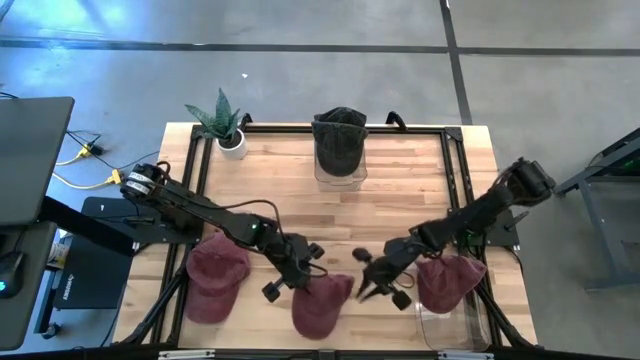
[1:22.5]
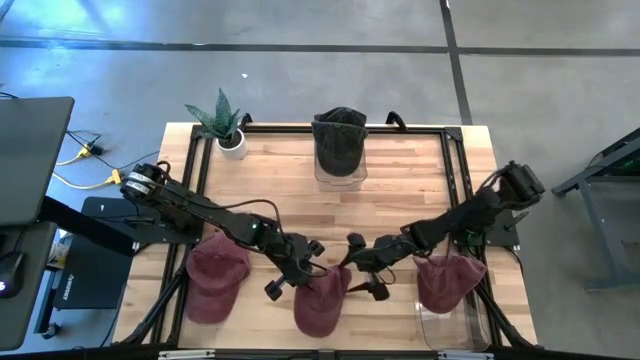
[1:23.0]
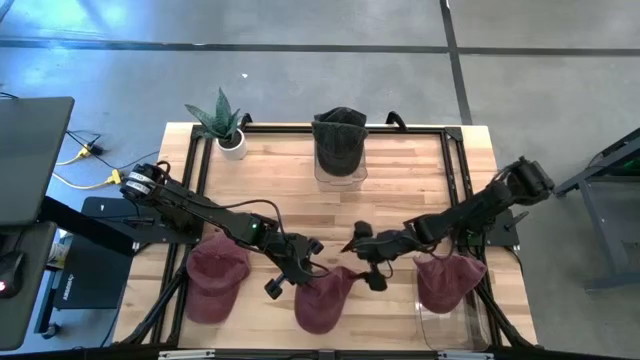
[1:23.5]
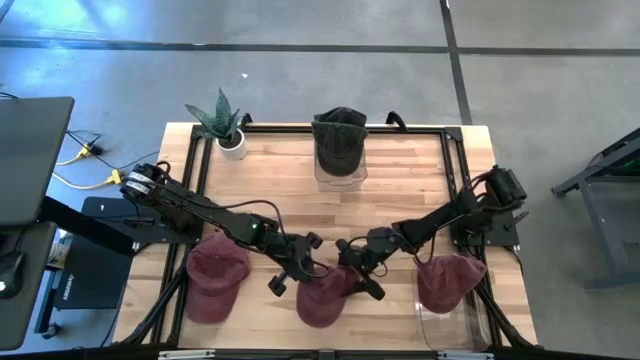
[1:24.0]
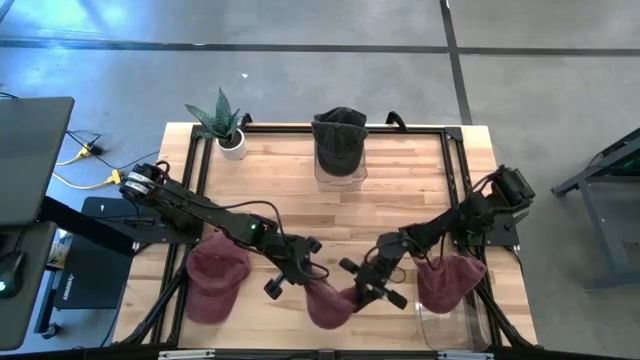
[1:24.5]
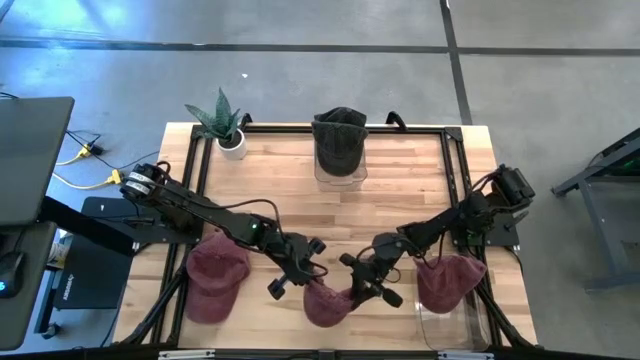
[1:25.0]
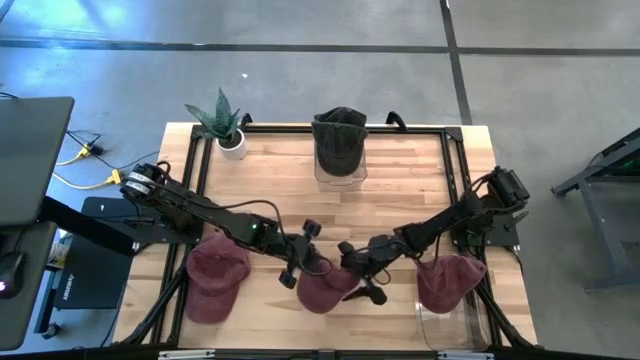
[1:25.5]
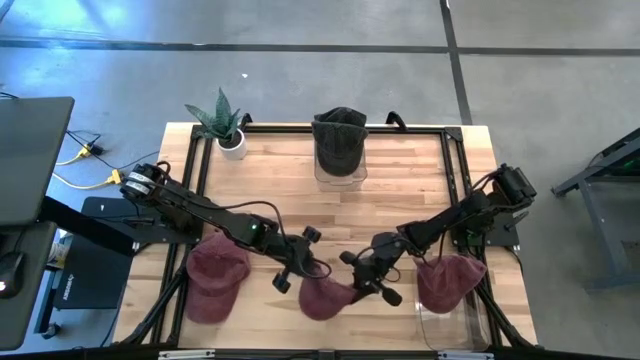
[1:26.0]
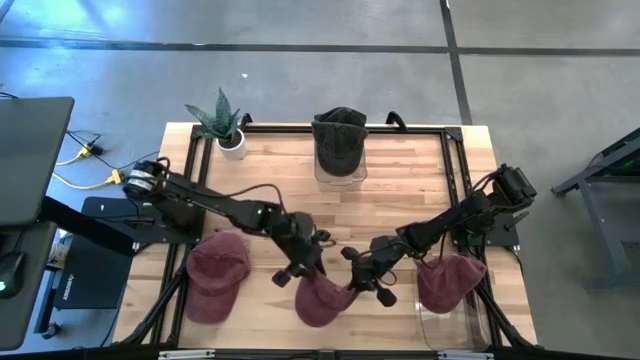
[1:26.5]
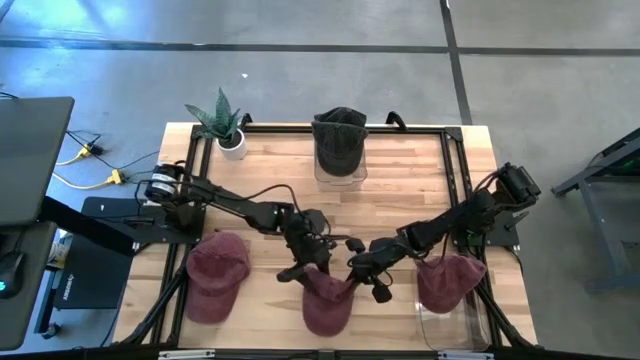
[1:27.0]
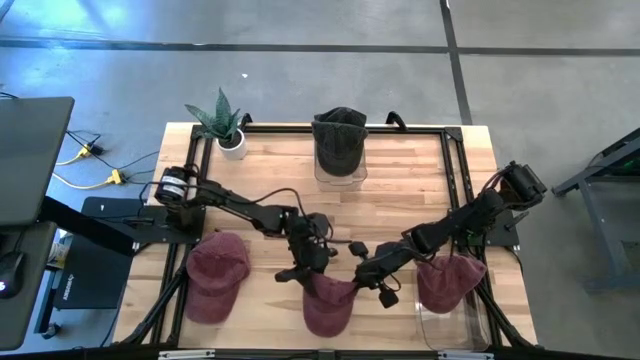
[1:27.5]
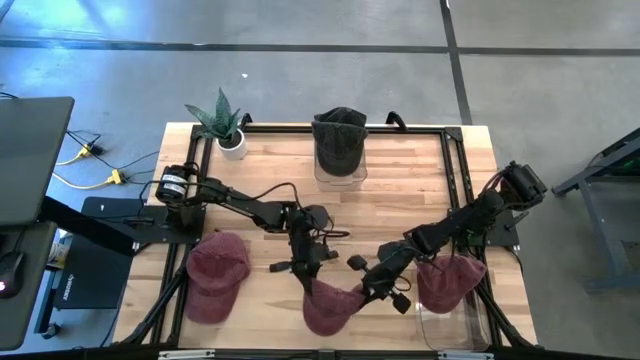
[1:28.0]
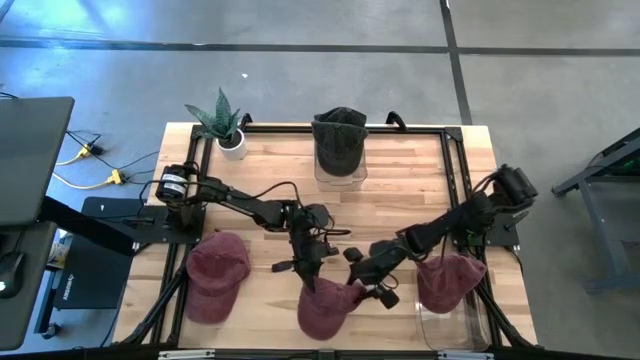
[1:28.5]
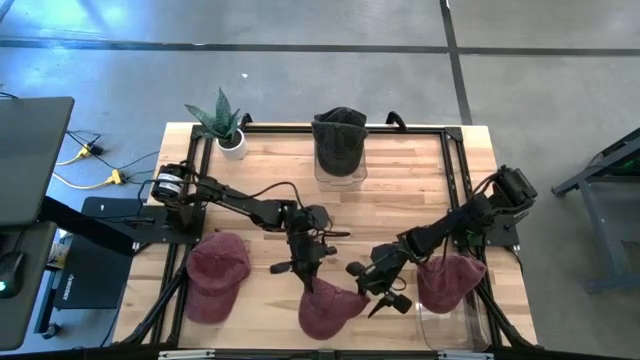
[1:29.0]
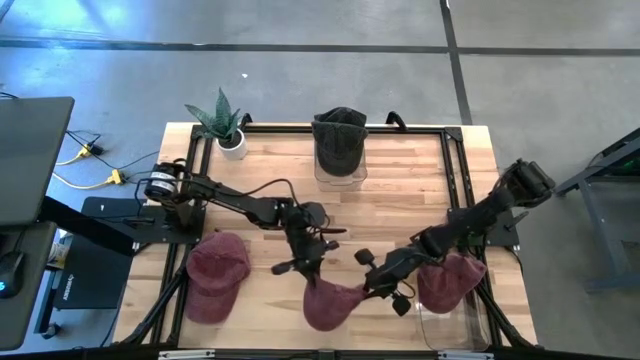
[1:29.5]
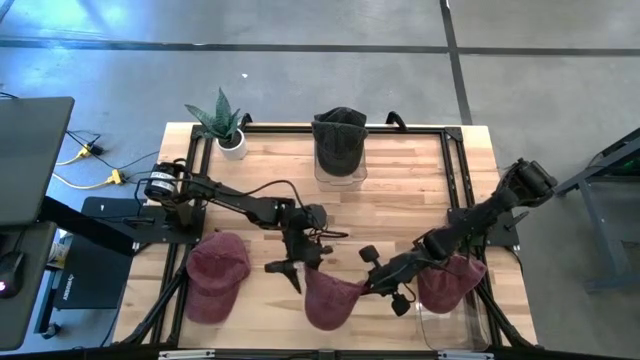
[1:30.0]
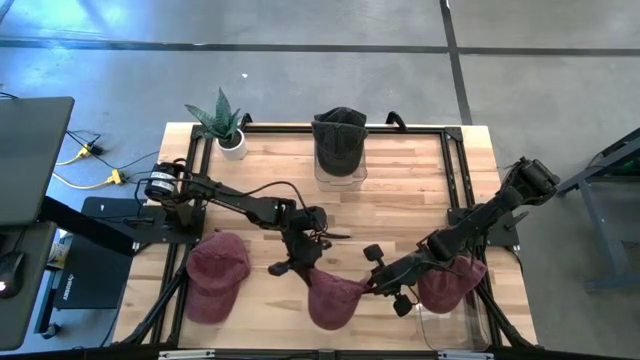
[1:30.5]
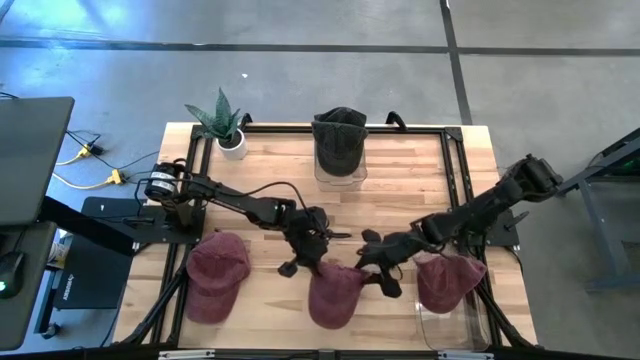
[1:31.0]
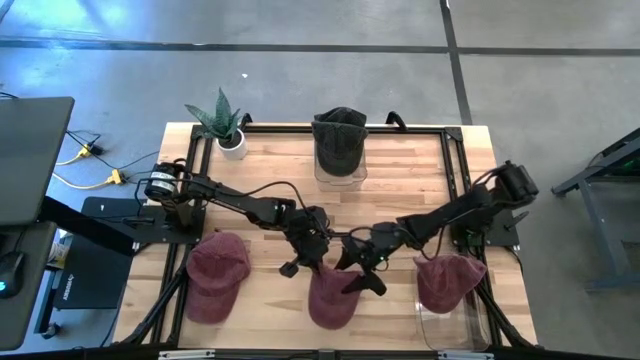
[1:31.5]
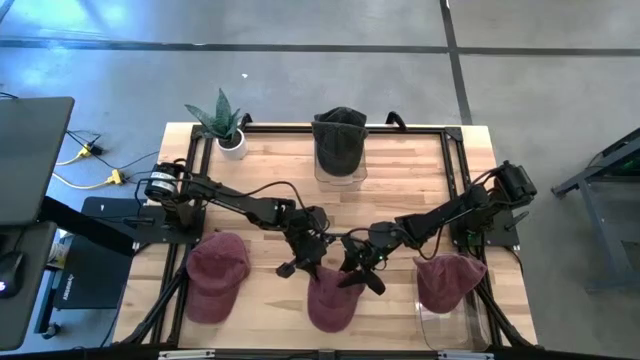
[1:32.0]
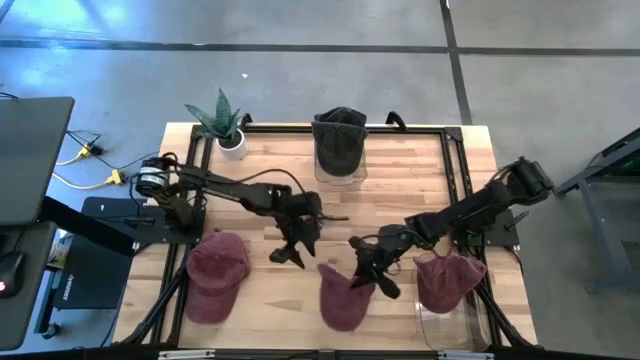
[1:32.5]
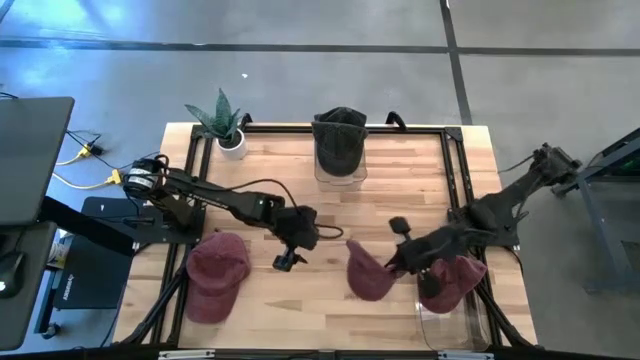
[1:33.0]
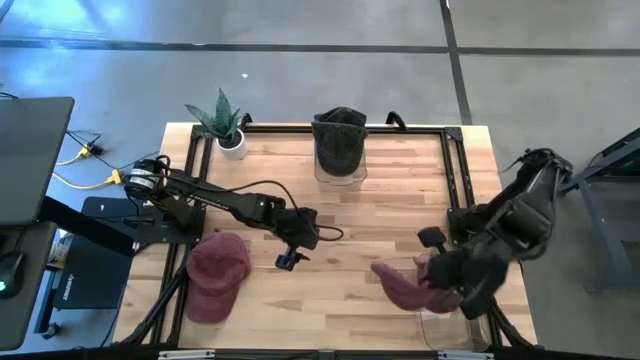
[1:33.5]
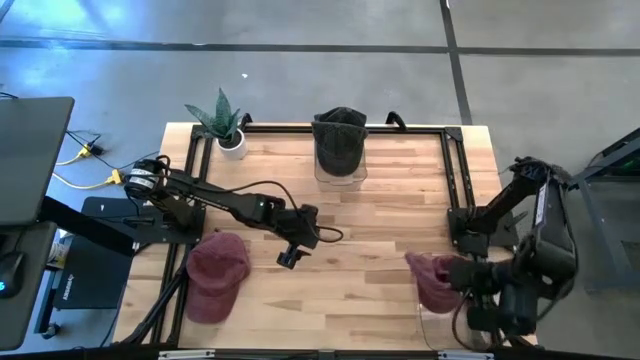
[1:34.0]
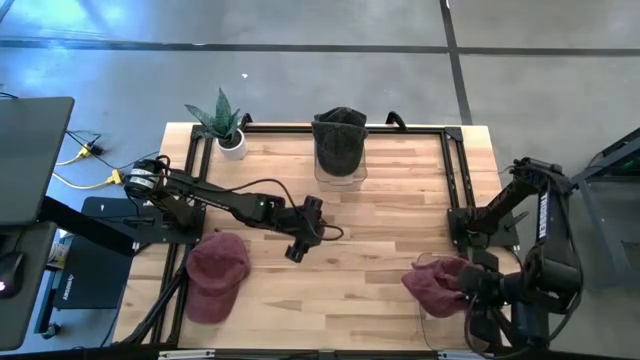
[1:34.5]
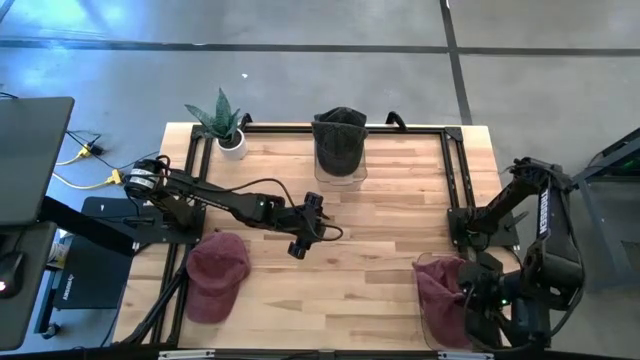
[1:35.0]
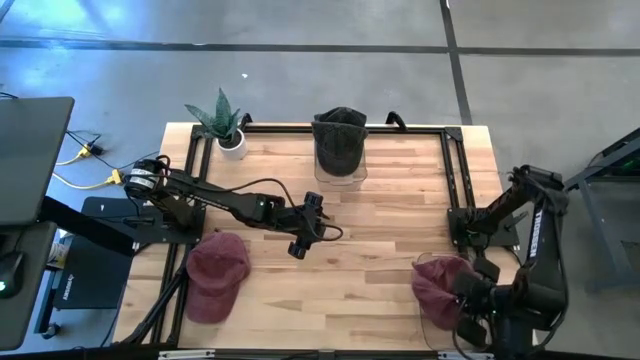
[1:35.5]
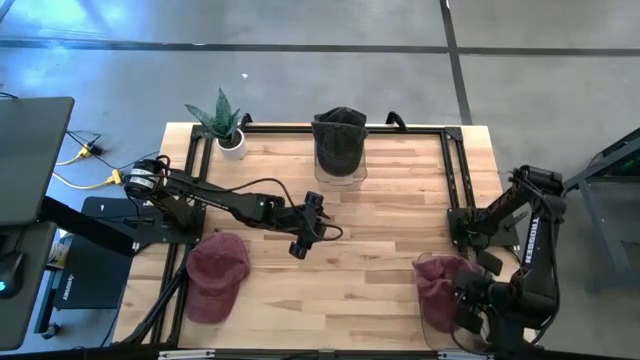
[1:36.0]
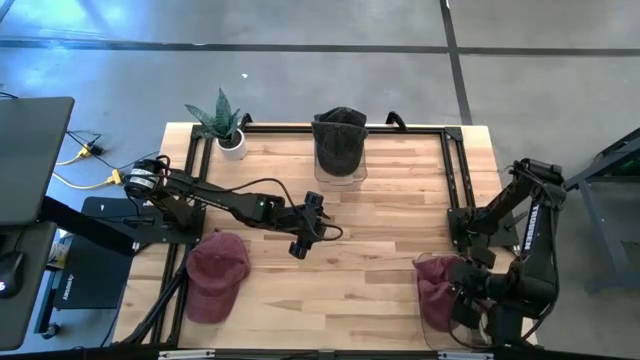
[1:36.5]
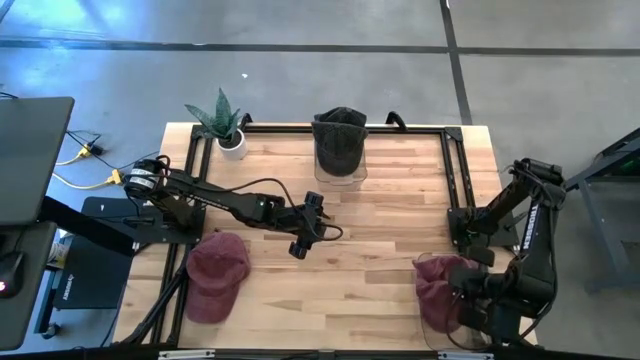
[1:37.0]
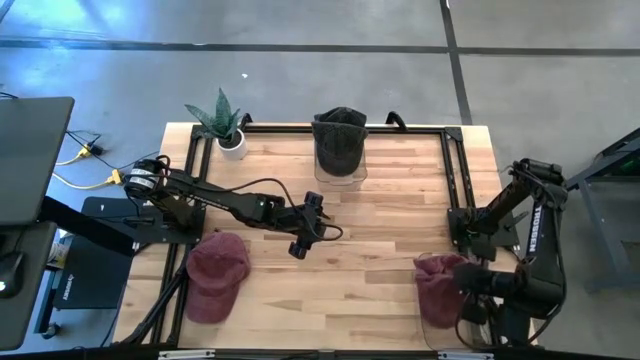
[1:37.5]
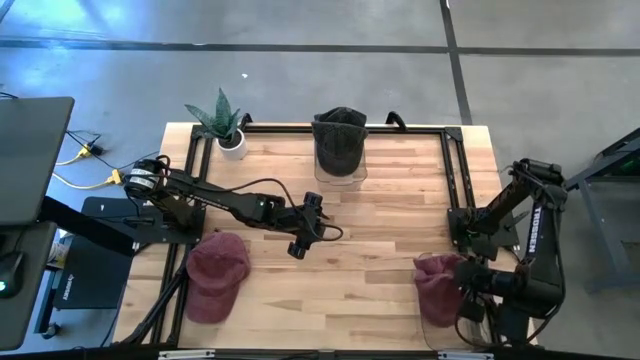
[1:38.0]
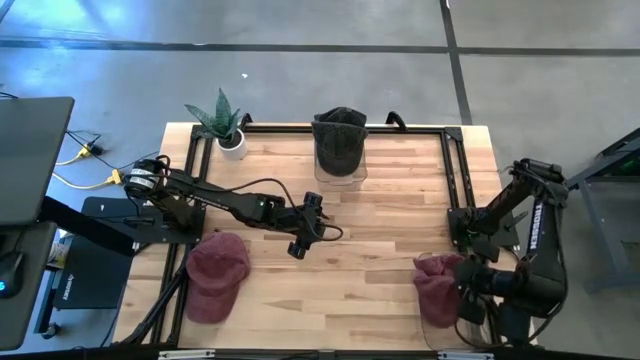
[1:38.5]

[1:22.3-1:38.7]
Task: Pick & Place hat
Put the top red cap into the bottom transparent bin

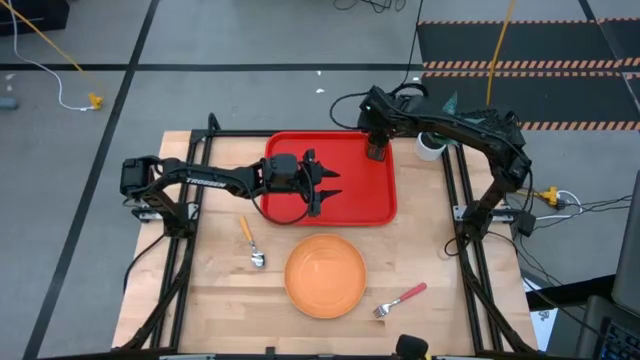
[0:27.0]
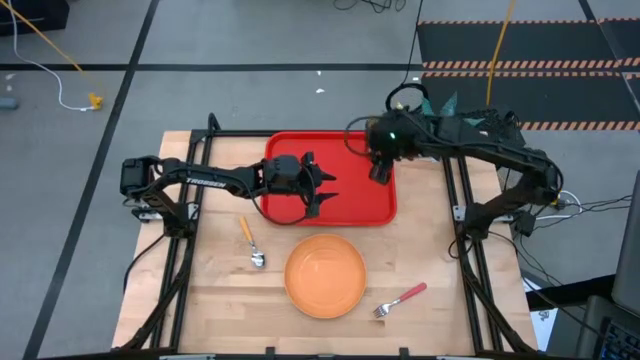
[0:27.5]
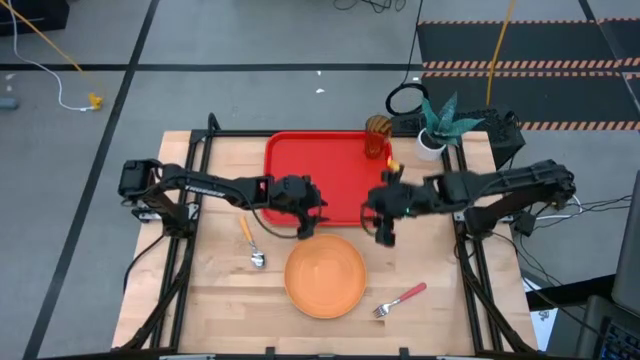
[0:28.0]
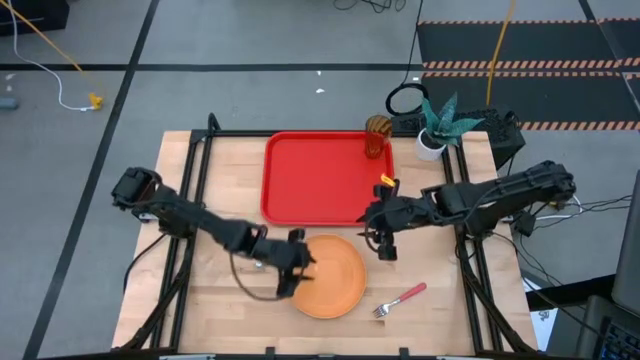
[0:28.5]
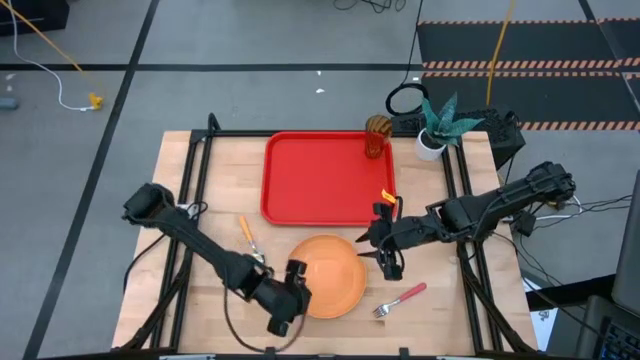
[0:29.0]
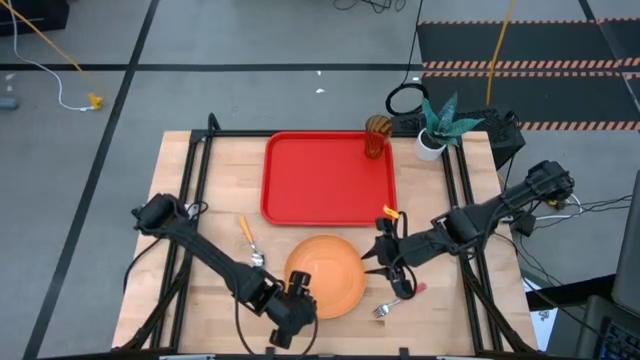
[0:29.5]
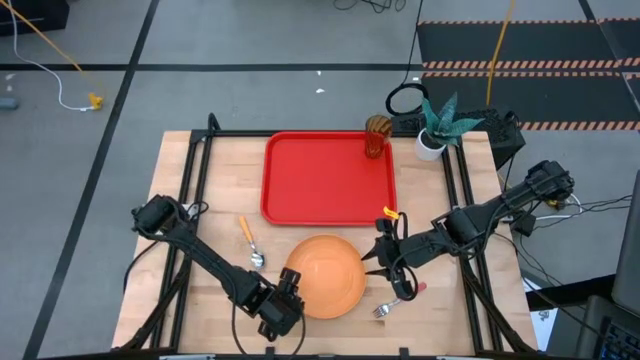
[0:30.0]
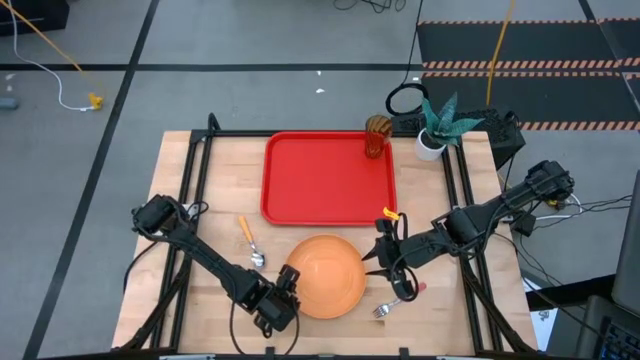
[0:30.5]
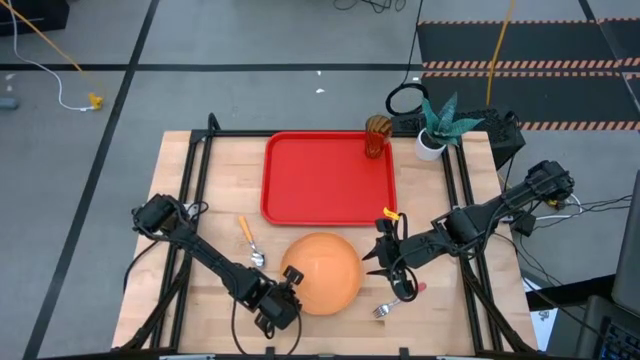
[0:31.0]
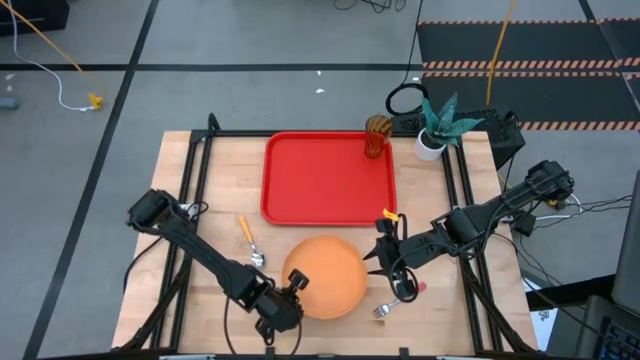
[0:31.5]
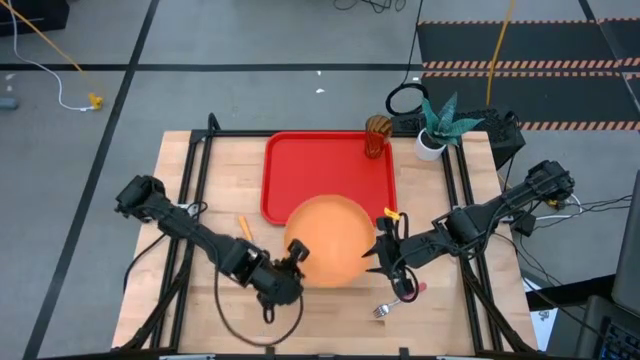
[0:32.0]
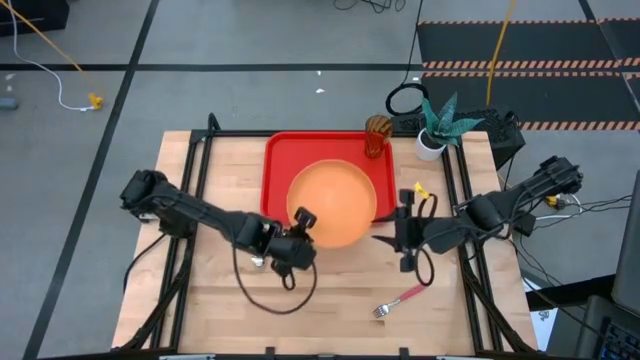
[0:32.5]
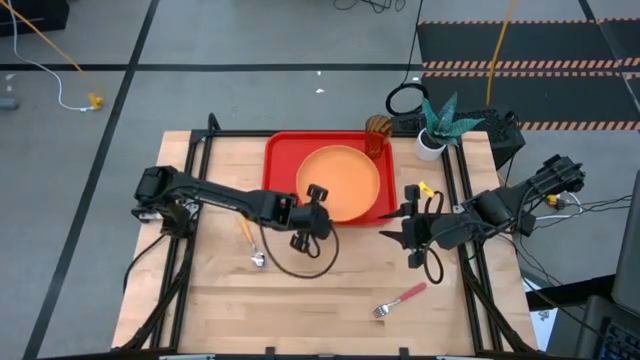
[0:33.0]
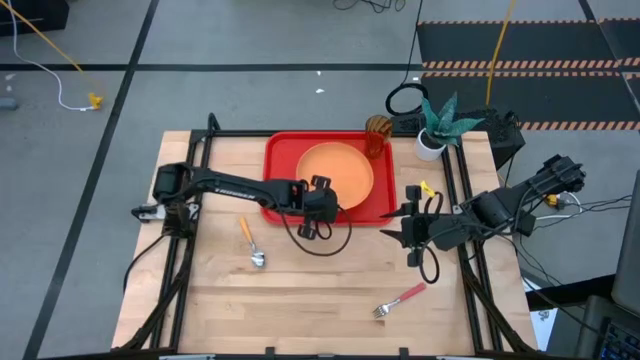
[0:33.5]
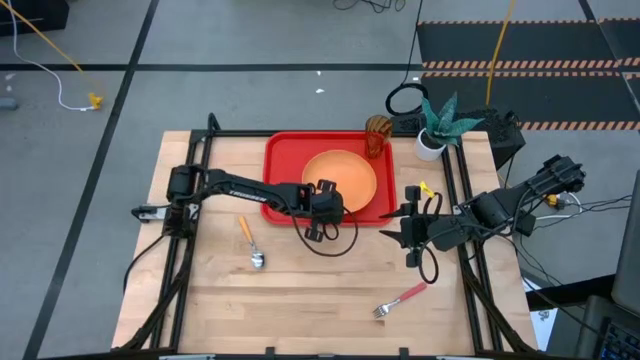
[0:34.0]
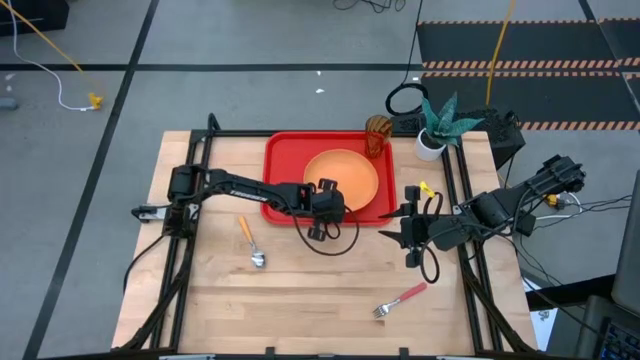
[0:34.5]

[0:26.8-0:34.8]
Task: Pick and place plate/cup/fork/spoon on tray
Put the orange plate on the red serving tray to the bottom left of the brown cup
